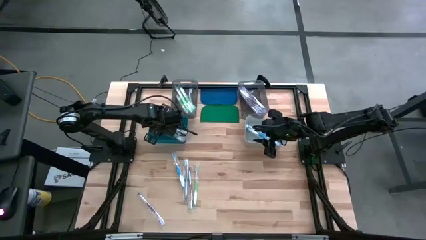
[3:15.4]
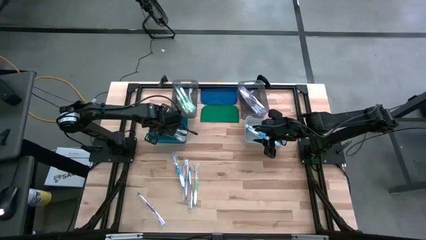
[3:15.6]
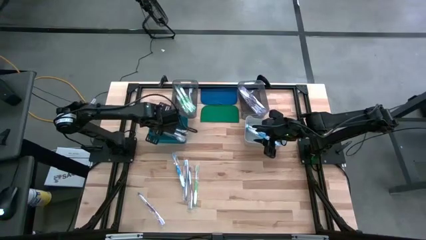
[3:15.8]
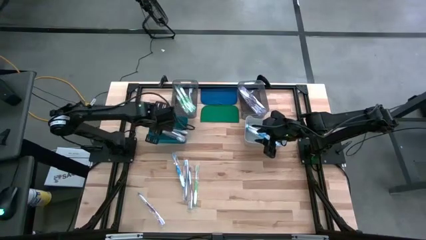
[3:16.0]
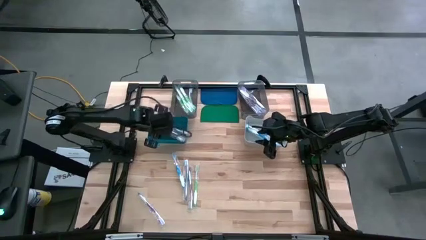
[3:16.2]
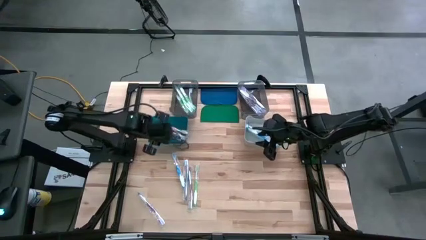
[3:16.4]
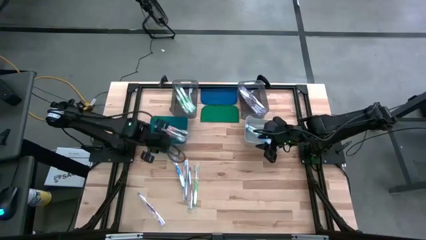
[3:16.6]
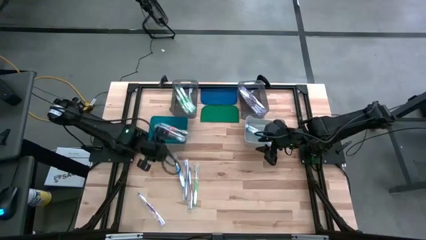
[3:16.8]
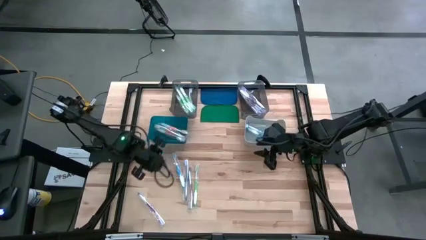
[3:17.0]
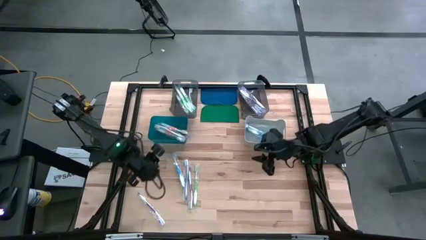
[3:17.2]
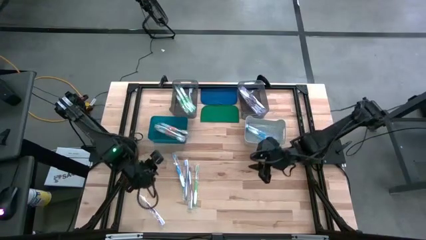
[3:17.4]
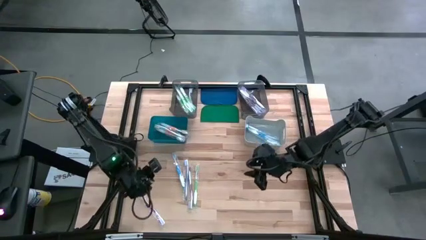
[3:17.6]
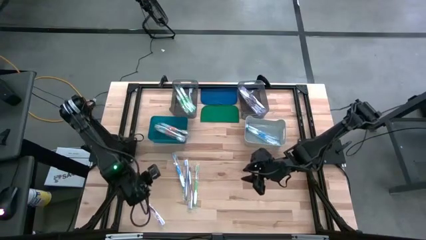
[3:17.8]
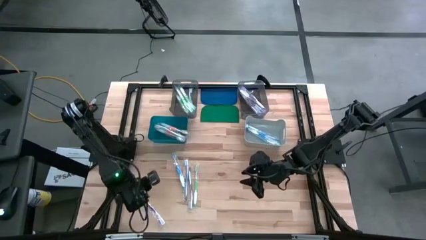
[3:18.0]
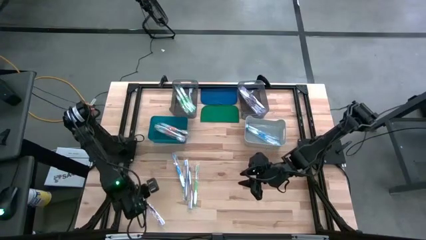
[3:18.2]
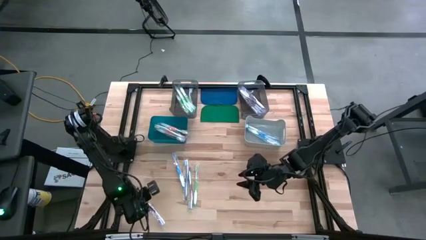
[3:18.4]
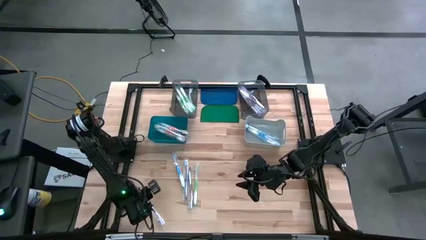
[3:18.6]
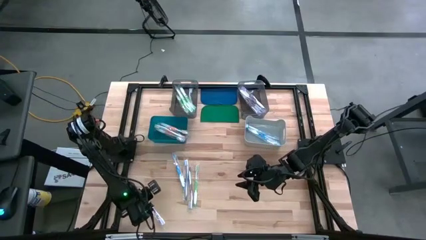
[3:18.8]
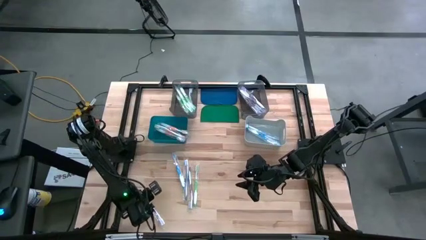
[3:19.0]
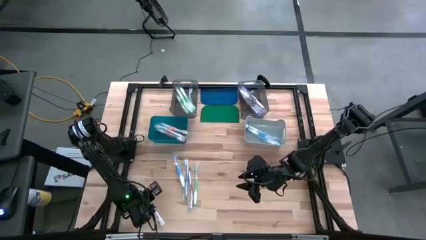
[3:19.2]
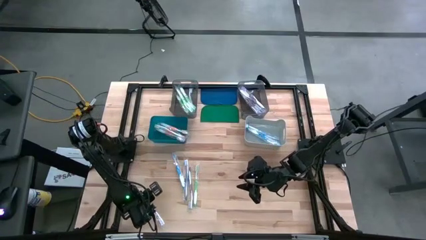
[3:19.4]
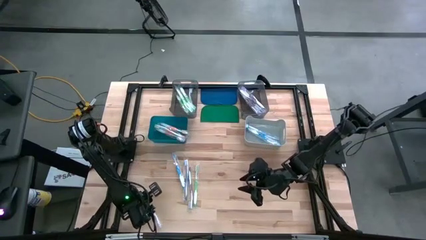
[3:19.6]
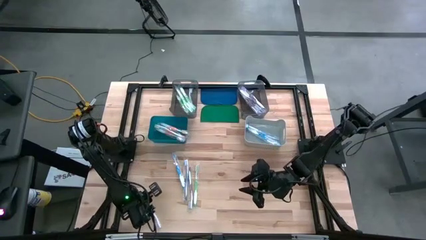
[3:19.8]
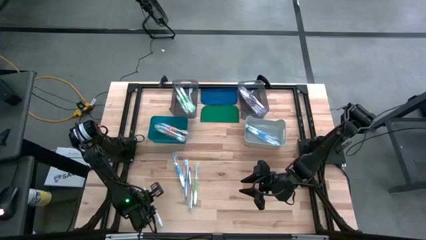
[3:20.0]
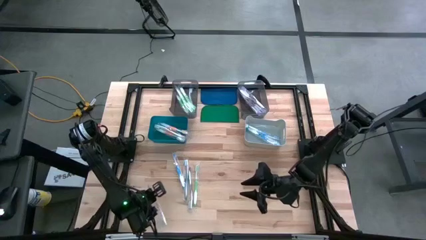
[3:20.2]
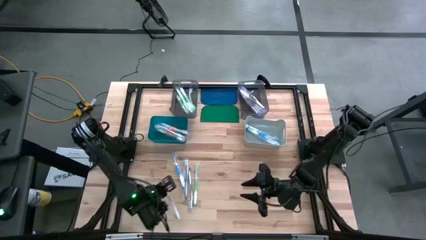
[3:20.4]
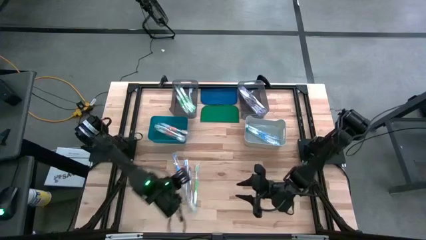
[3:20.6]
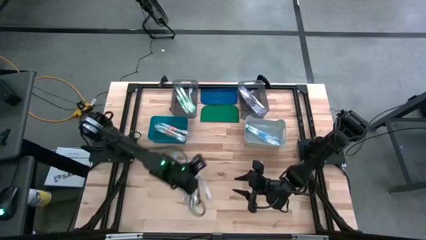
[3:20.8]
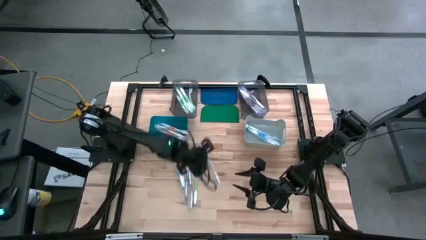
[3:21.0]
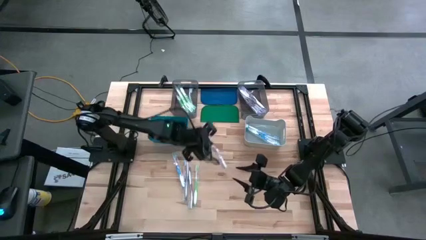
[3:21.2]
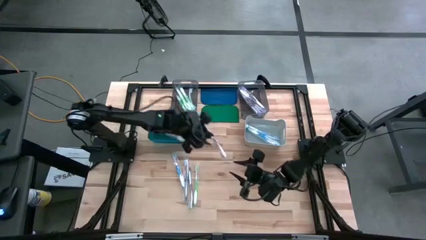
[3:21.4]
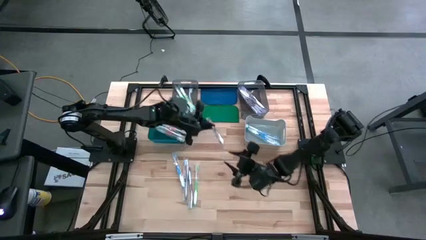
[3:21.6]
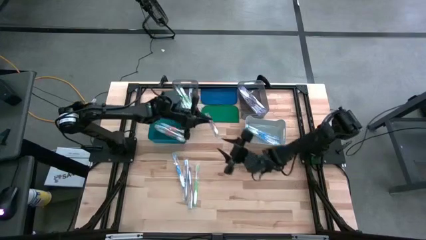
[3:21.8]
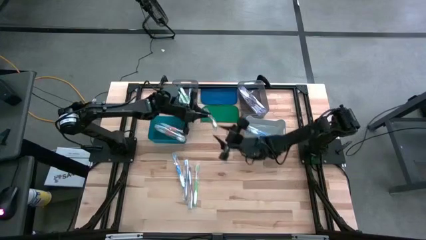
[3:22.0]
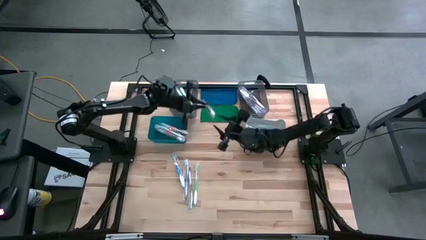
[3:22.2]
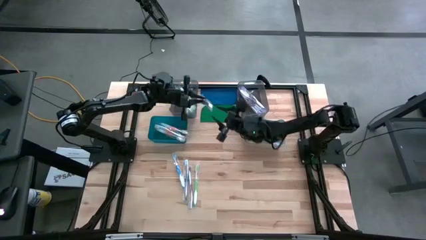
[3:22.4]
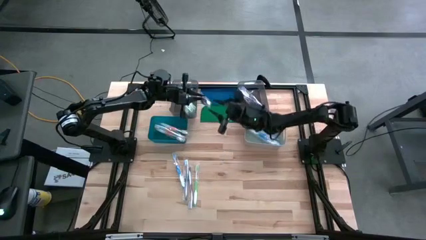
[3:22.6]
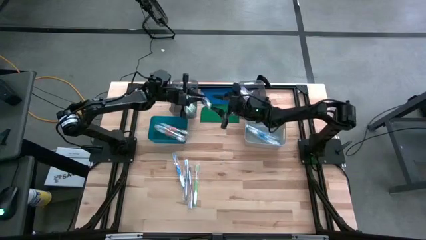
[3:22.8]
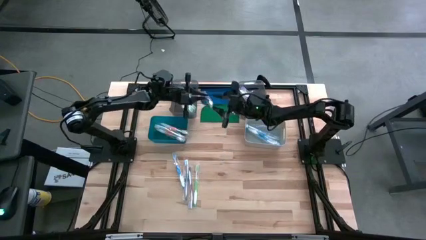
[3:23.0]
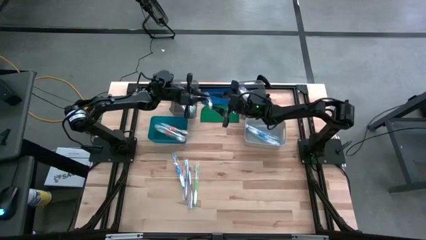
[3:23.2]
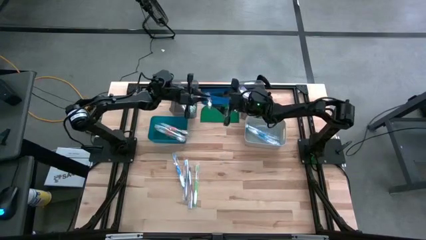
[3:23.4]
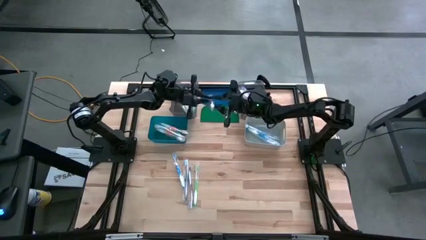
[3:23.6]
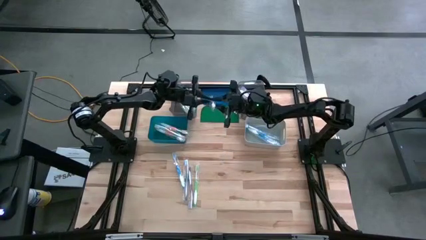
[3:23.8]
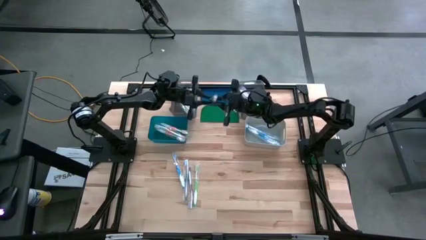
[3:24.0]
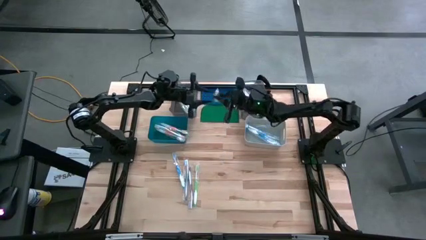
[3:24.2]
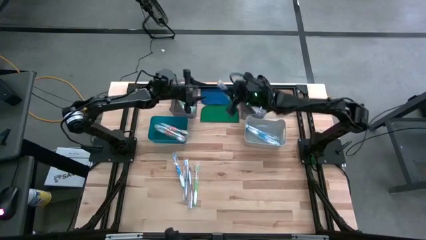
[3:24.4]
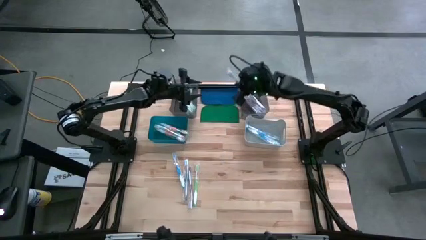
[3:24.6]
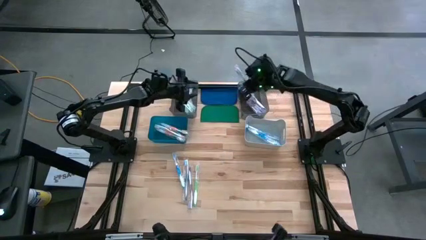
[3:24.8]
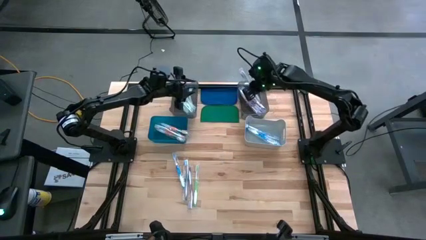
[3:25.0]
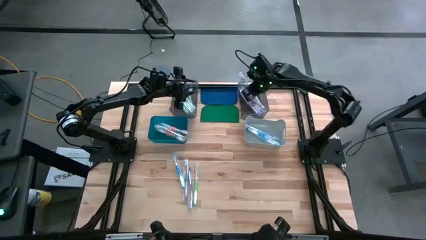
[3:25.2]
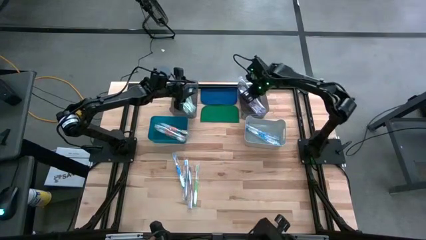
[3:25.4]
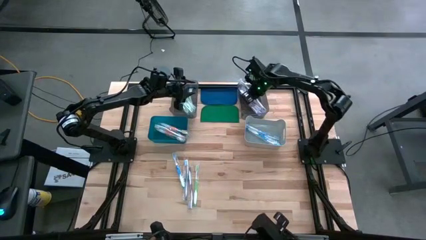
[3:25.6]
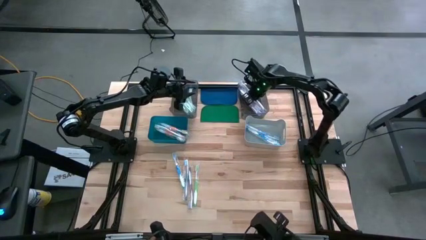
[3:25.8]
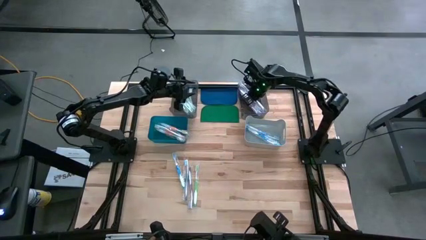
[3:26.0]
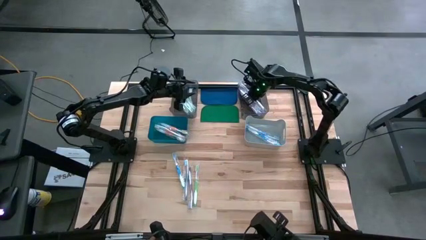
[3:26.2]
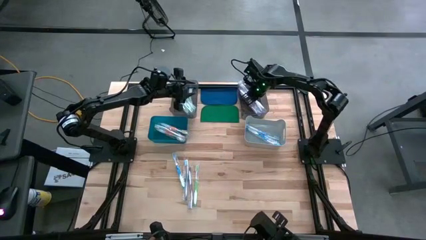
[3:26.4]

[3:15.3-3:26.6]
Task: Pick & Place Toothbrushes
Put the violet toothbrush into the right black bin

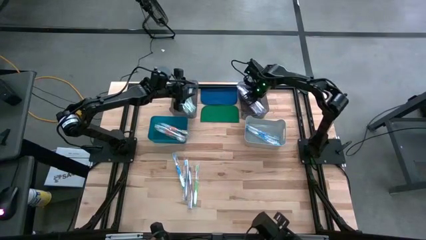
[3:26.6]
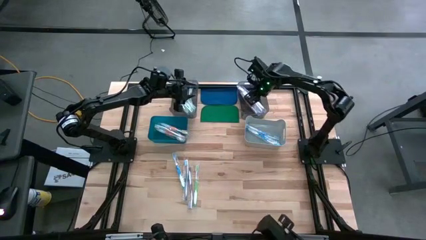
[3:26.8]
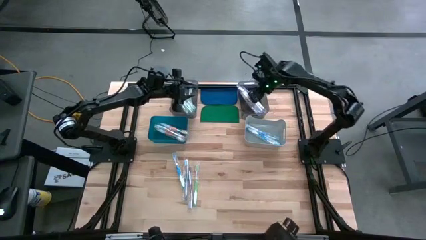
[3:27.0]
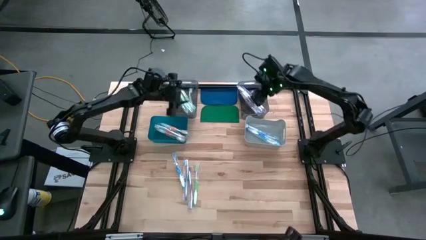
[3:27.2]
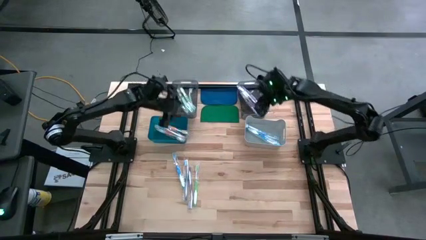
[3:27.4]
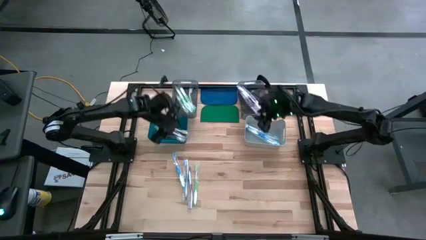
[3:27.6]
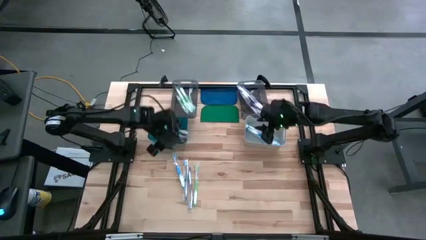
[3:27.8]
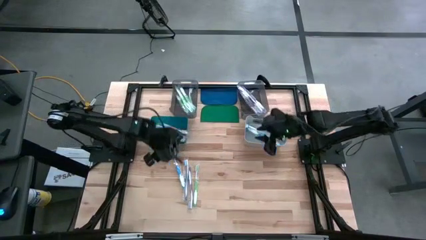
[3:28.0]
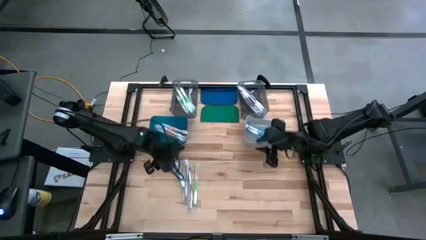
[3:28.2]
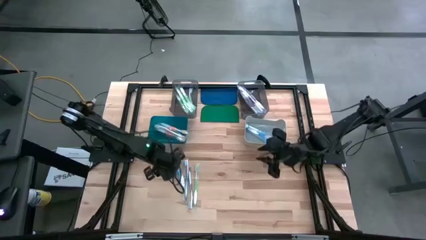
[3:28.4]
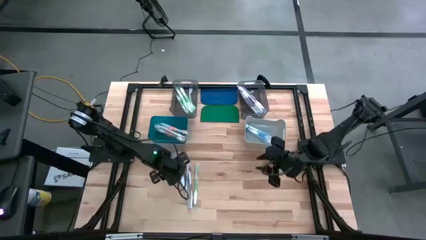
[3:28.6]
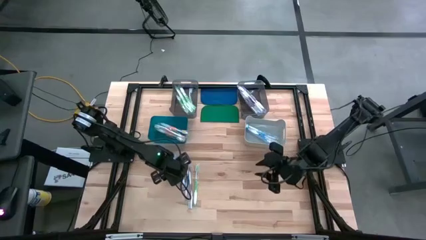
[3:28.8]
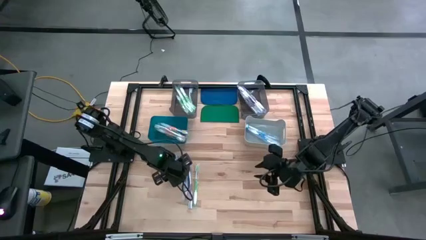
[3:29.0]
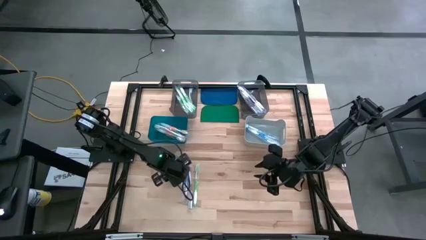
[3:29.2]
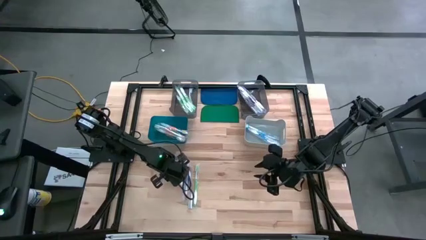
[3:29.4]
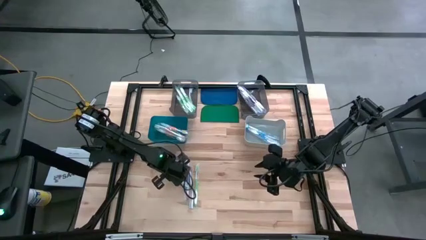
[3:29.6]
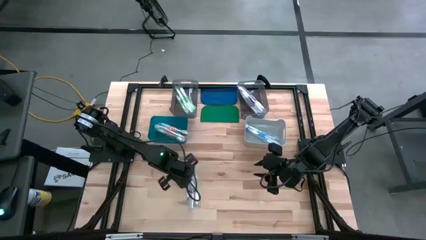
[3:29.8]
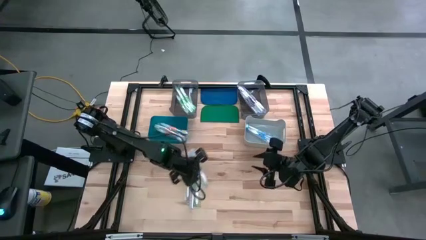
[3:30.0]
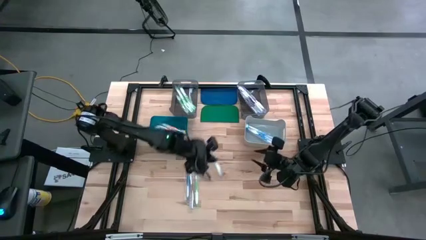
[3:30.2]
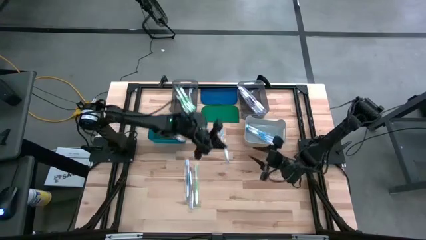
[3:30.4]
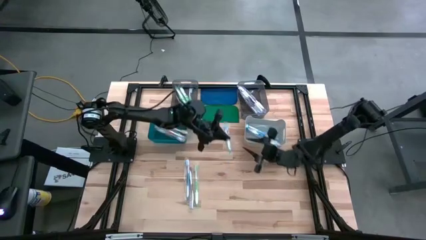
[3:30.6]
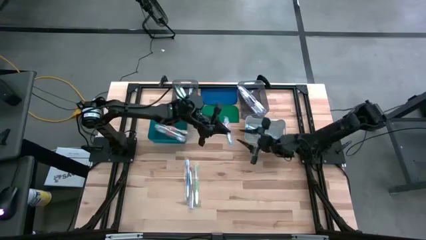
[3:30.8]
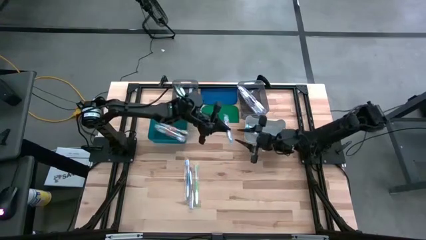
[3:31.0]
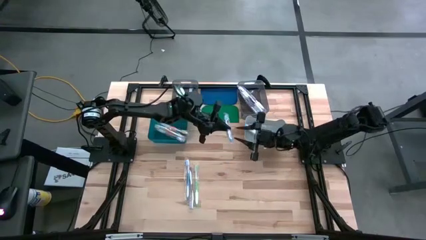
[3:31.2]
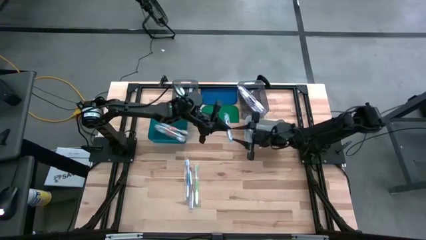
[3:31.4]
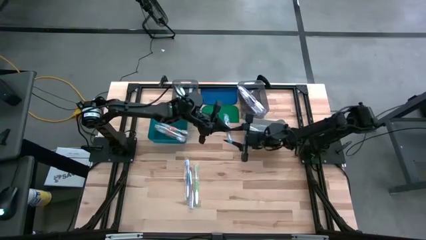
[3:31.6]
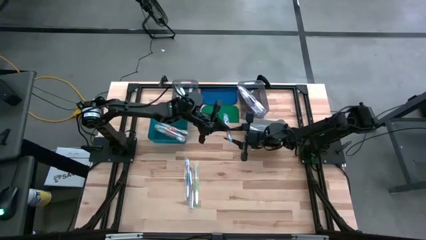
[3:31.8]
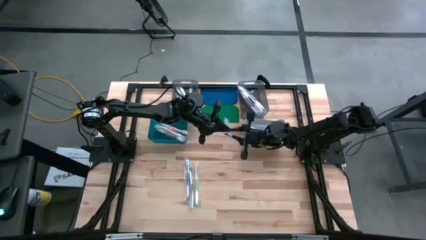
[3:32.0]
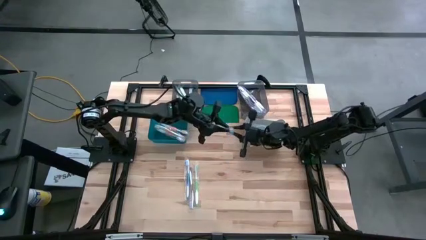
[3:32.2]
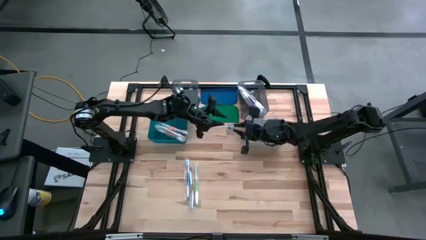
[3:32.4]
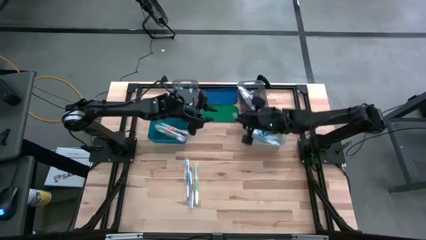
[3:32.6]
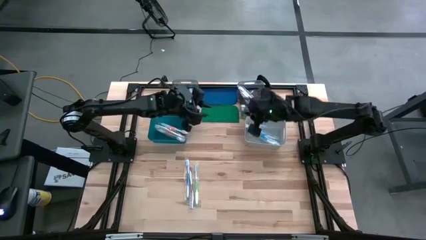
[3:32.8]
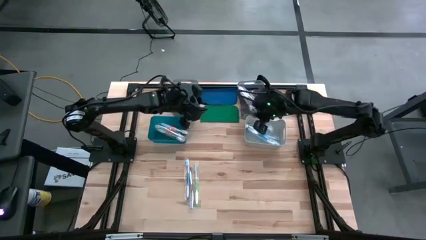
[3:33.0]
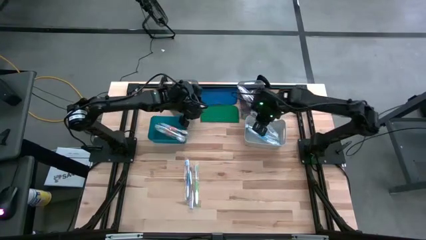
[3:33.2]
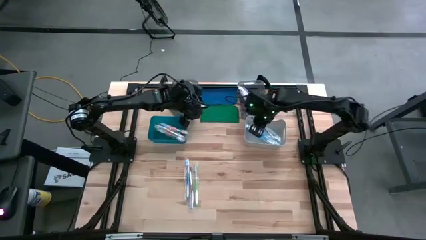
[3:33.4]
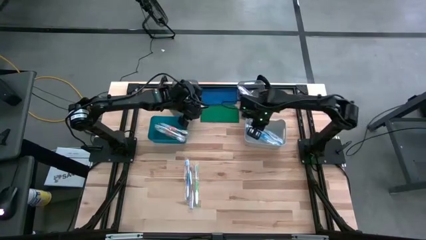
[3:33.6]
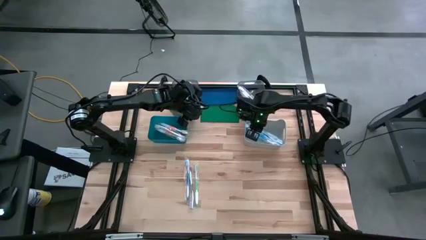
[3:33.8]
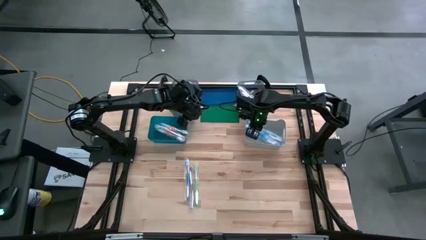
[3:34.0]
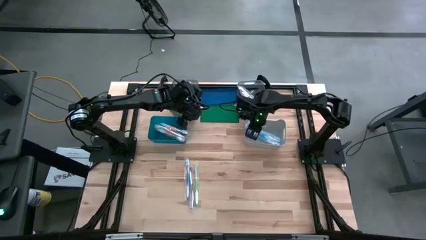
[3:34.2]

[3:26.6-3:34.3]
Put the blue toothbrush into the grey bin
